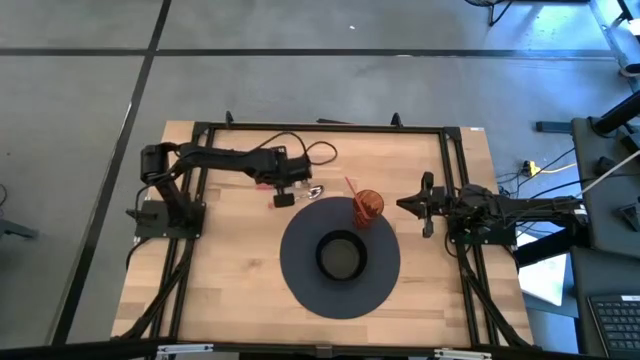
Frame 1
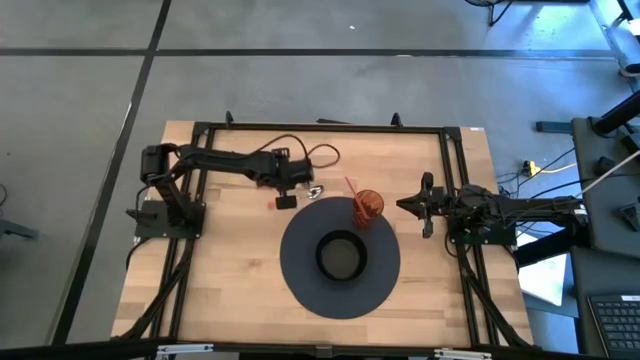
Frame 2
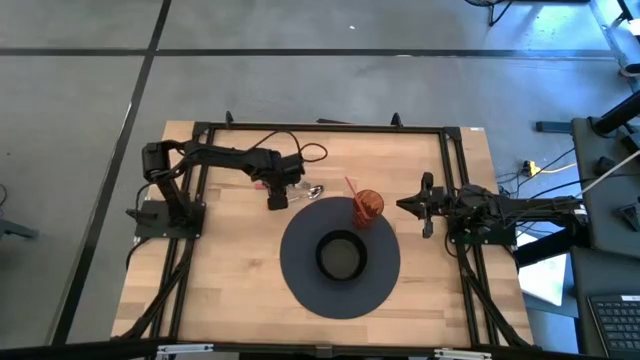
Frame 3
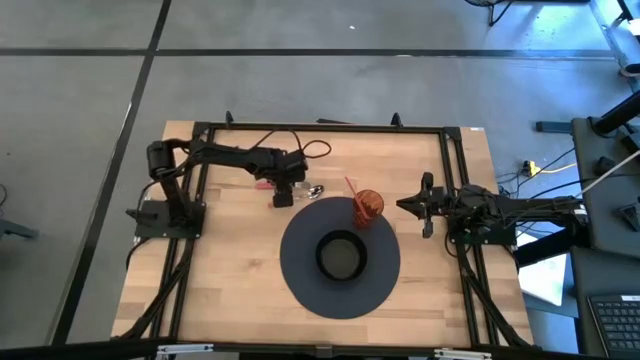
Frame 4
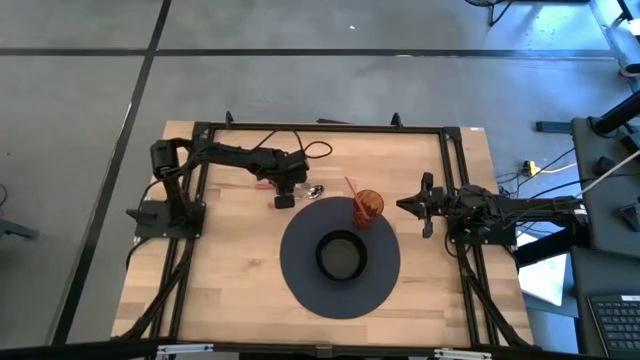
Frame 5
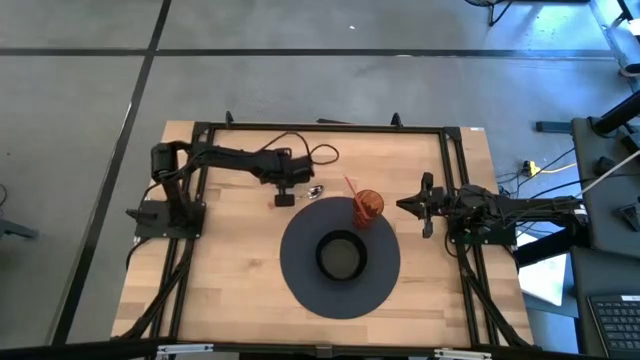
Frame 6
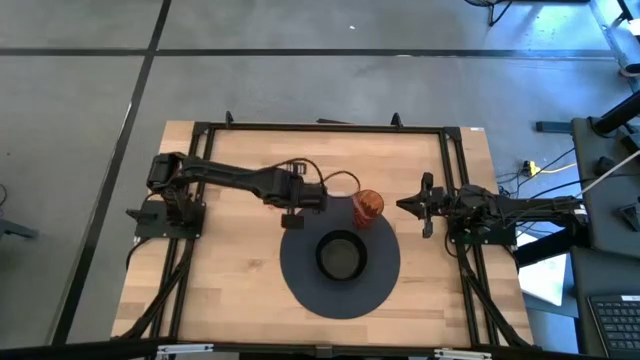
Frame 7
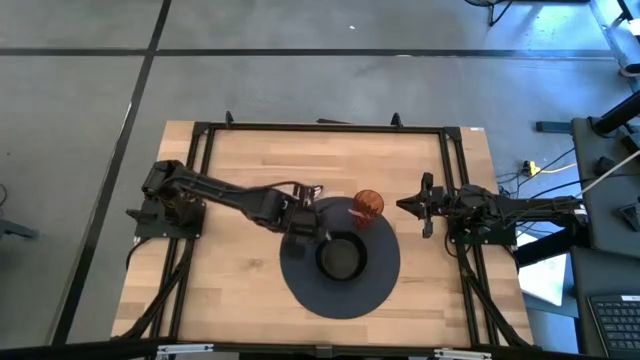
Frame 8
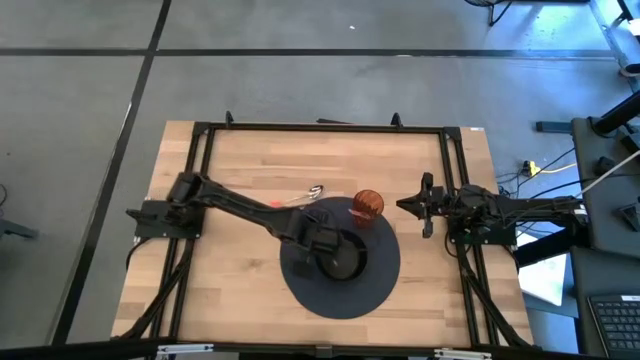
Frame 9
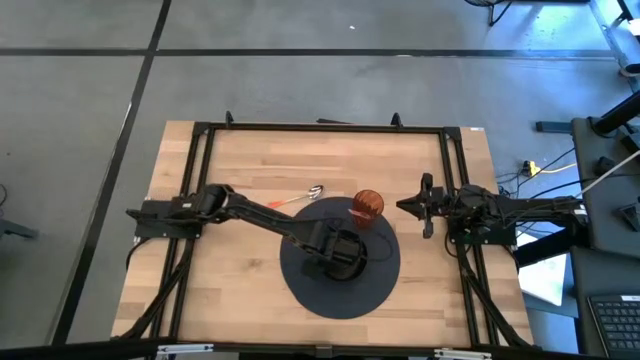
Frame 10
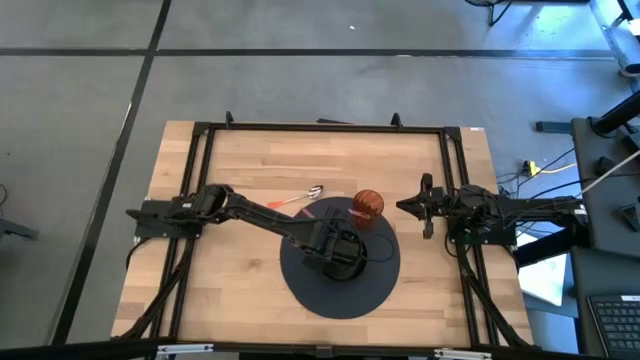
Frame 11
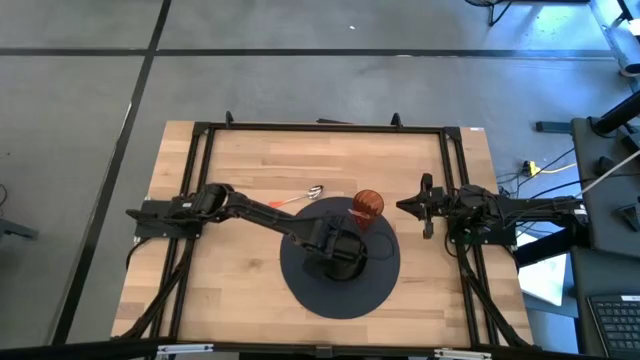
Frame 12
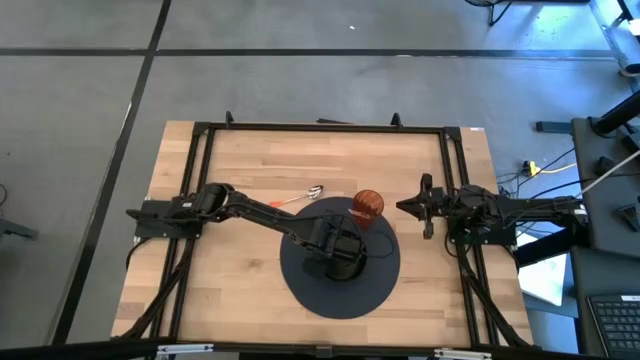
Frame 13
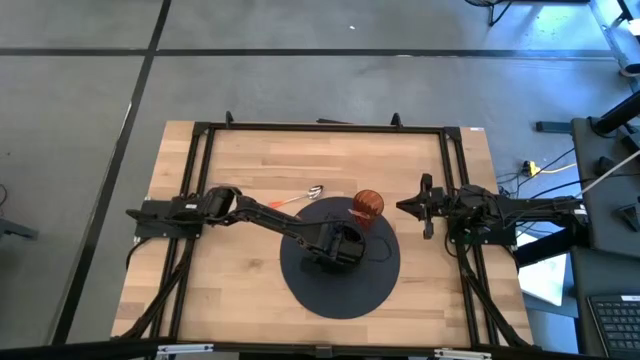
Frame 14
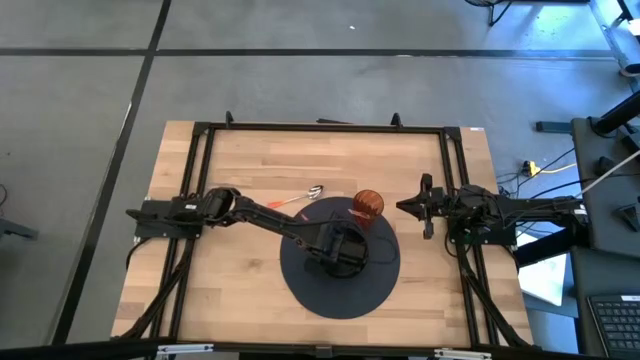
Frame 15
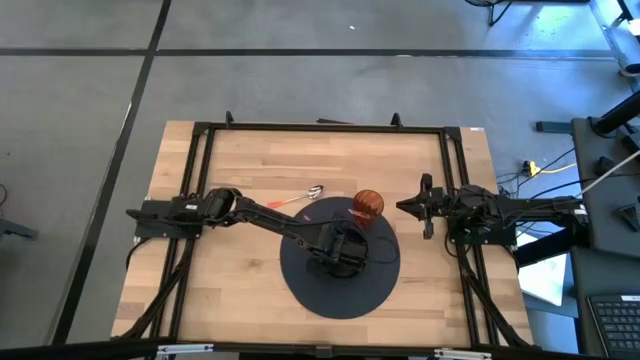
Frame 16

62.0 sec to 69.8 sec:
Task: Pick & Place Utensil
Put the pink fork into the black bowl

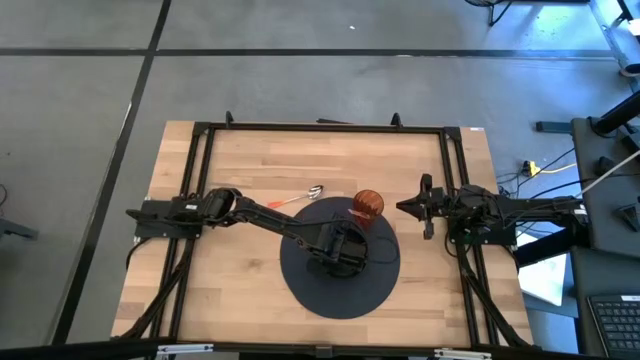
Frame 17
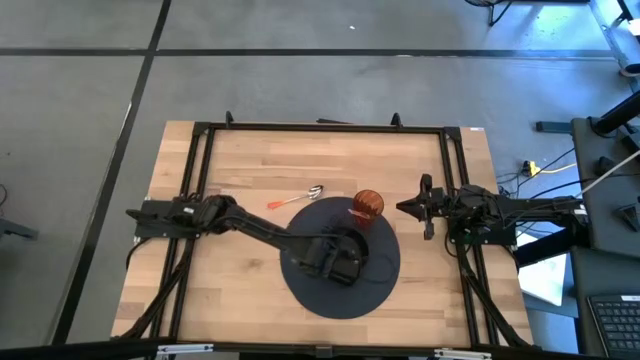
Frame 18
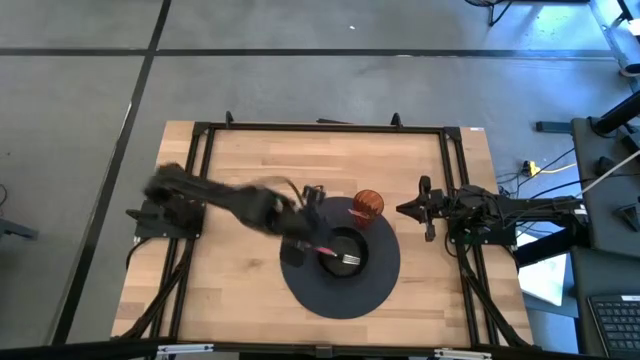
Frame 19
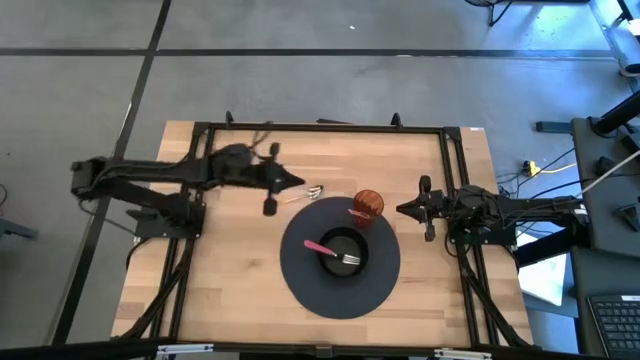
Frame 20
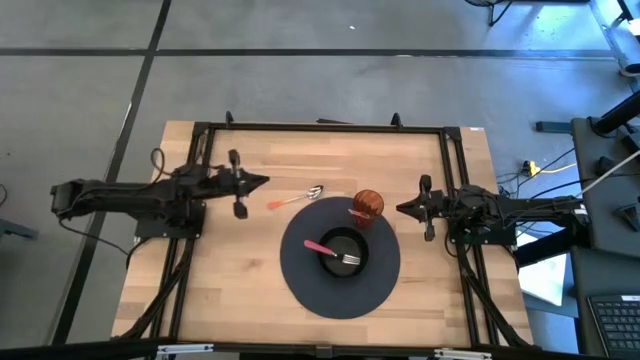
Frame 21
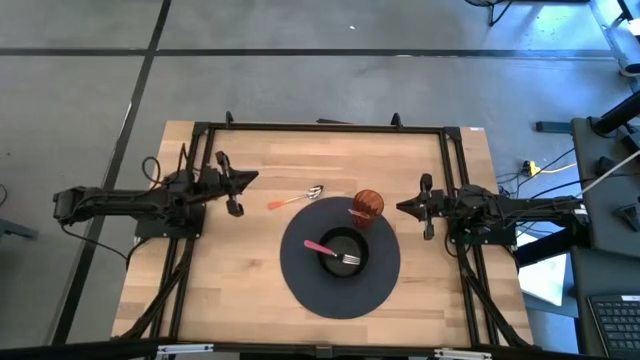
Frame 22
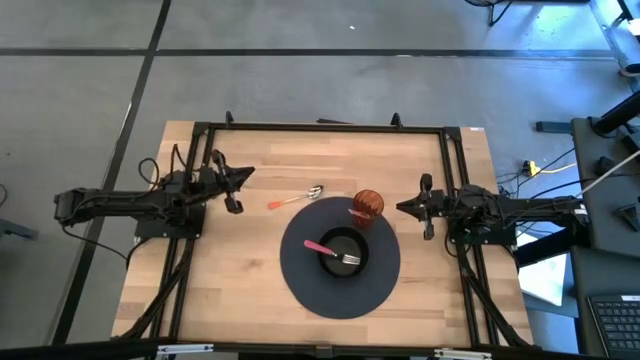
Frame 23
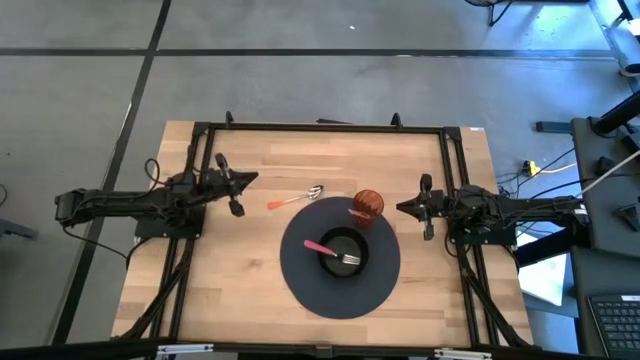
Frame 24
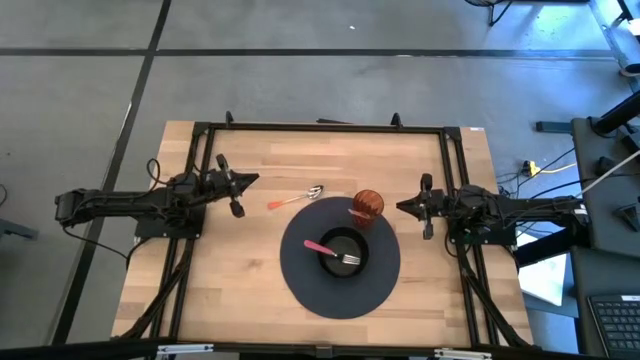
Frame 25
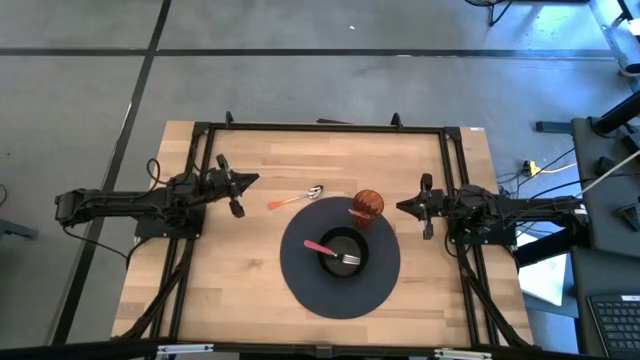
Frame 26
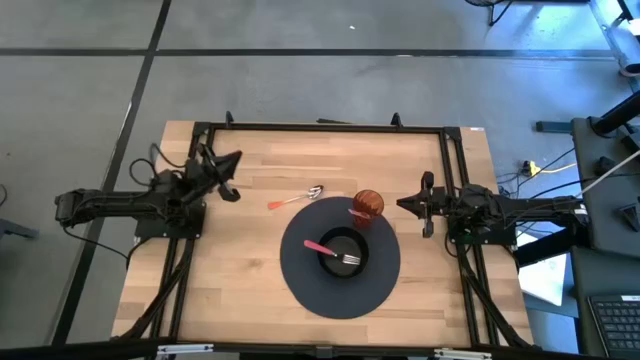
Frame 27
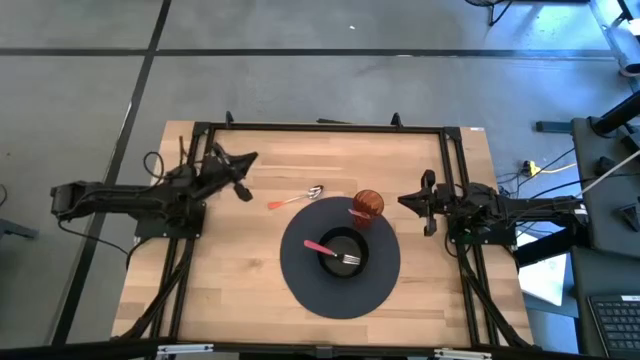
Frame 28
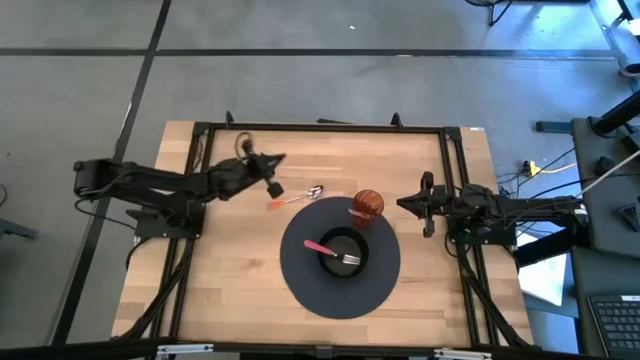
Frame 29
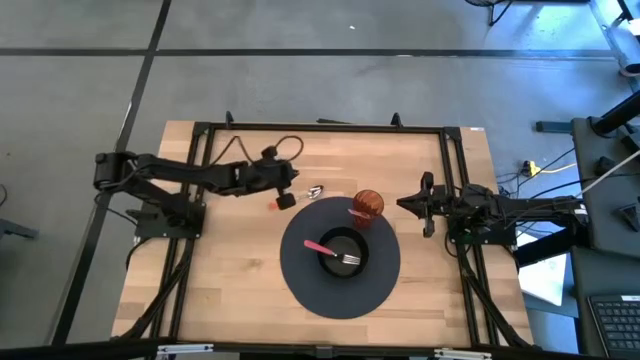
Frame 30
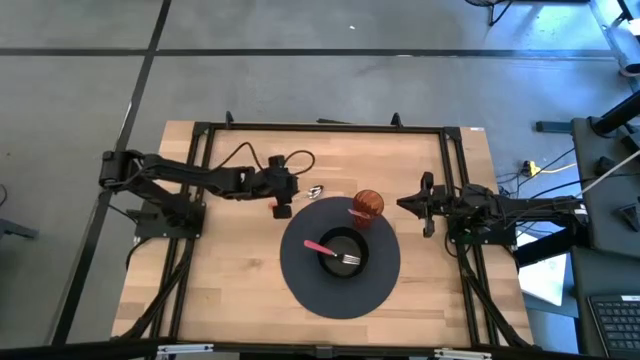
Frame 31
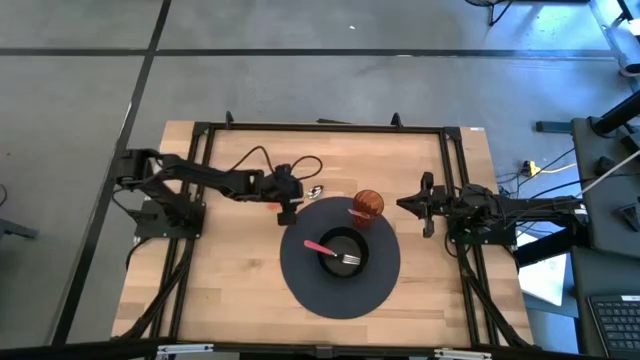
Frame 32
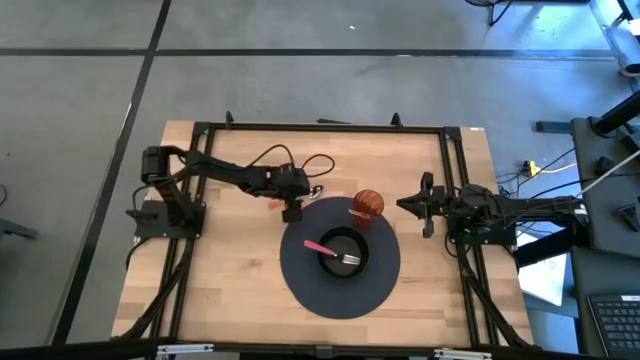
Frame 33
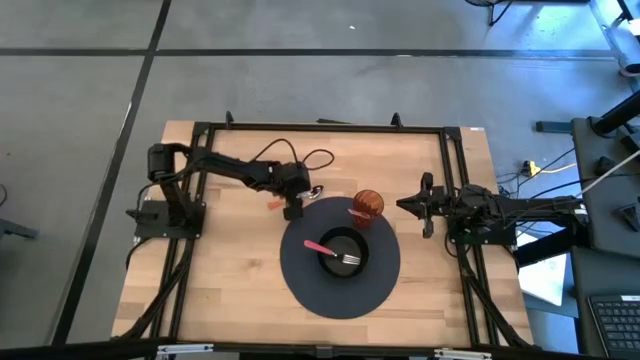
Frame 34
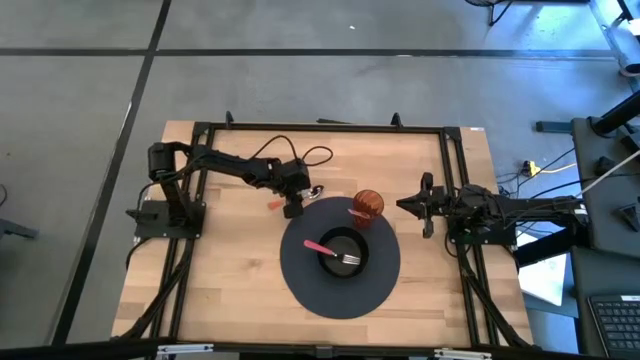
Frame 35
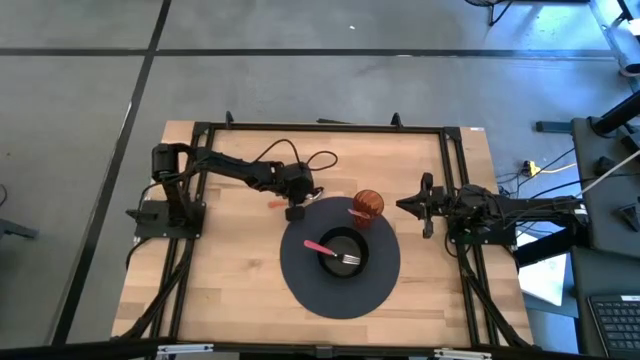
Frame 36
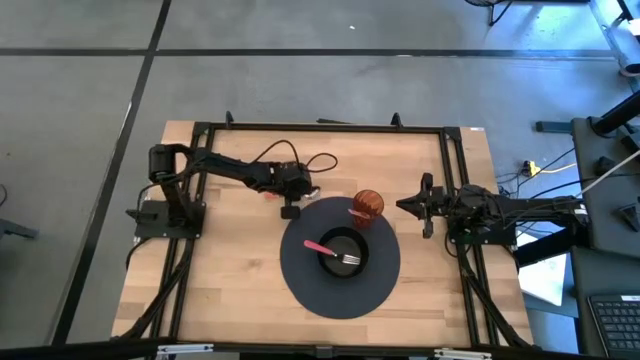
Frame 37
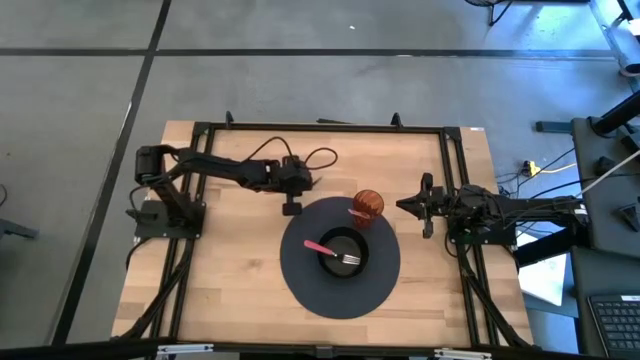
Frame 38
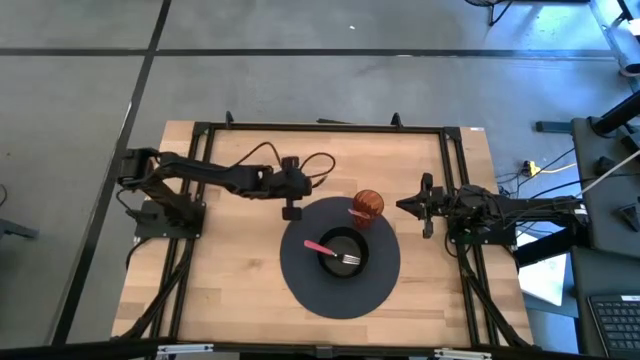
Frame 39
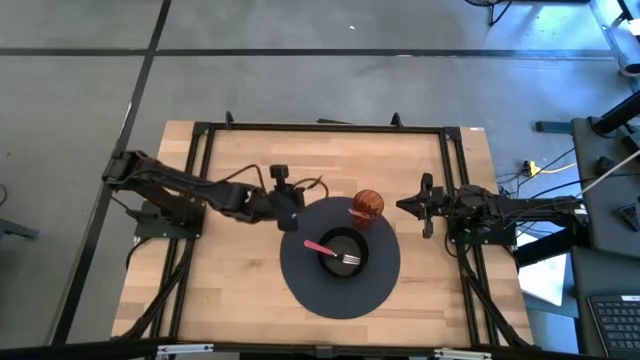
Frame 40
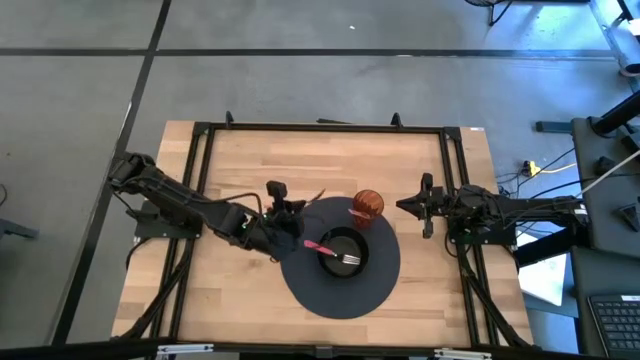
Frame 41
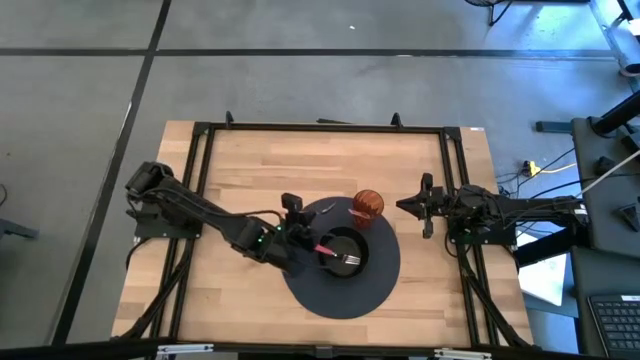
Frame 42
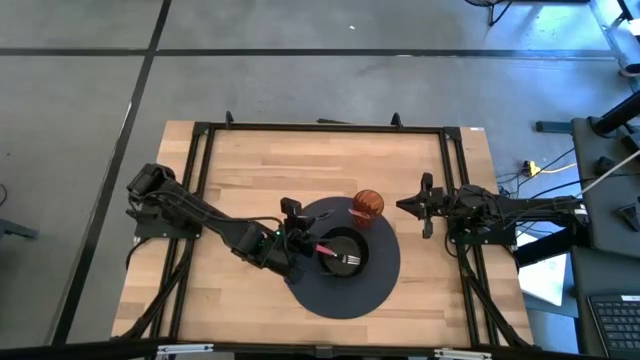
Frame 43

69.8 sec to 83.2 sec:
Put the orange spoon into the black bowl
